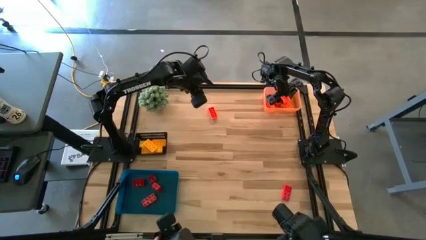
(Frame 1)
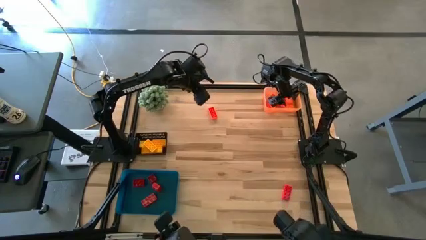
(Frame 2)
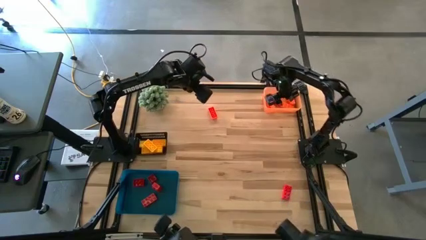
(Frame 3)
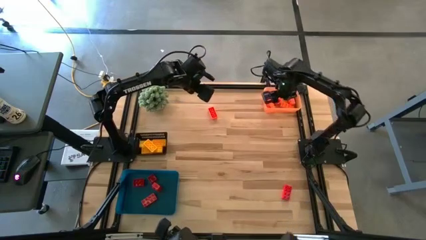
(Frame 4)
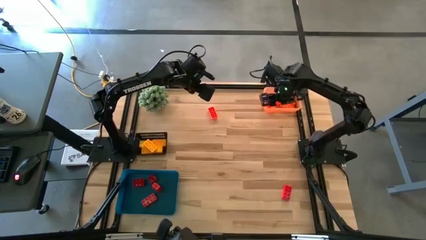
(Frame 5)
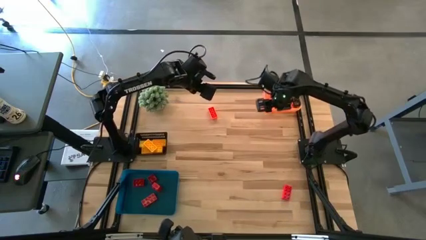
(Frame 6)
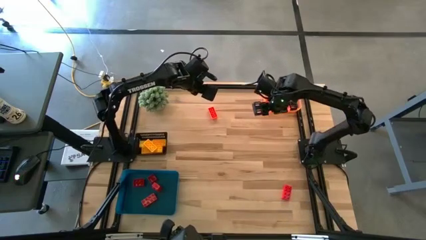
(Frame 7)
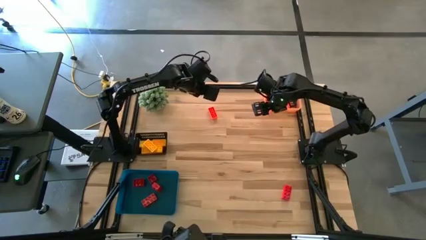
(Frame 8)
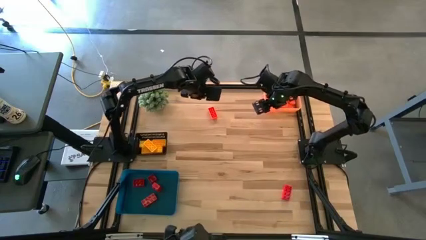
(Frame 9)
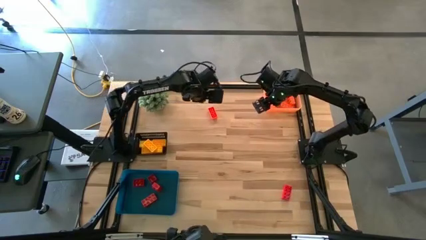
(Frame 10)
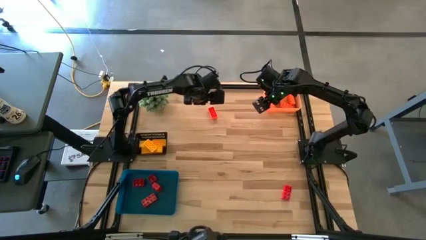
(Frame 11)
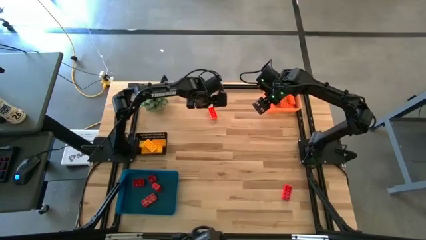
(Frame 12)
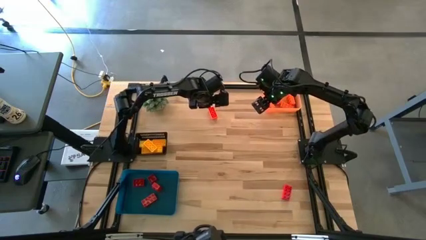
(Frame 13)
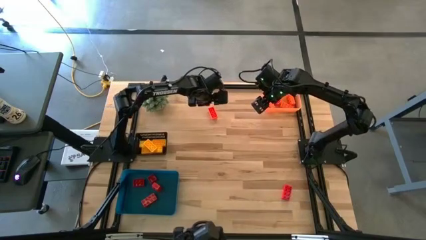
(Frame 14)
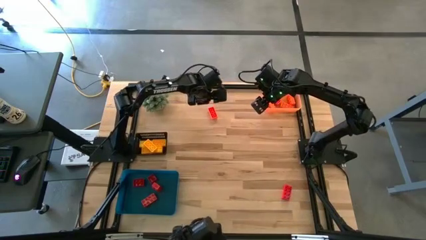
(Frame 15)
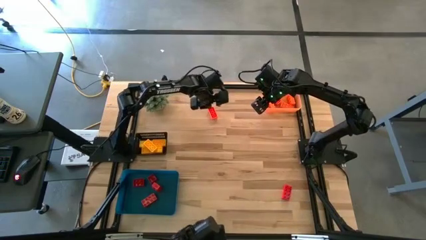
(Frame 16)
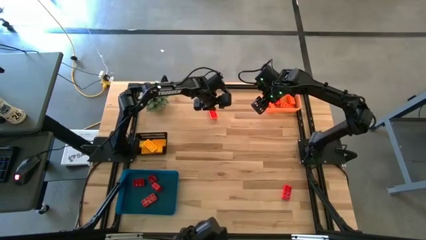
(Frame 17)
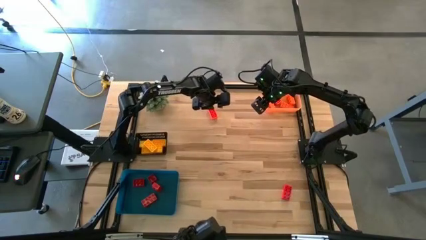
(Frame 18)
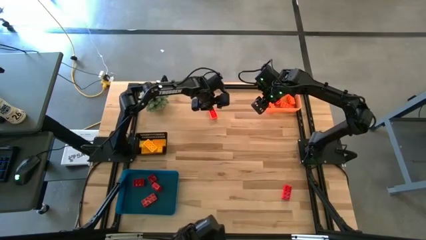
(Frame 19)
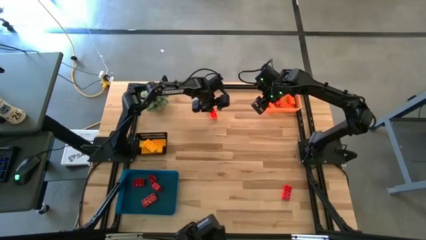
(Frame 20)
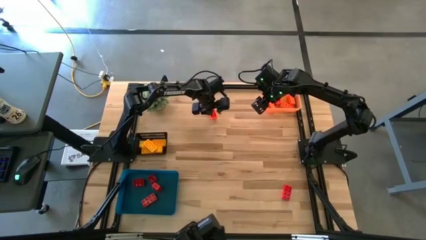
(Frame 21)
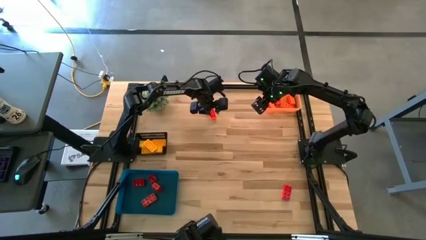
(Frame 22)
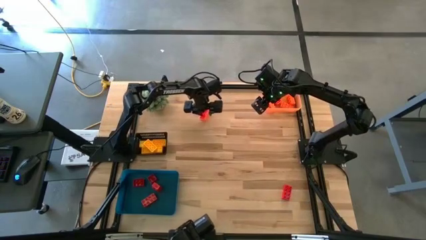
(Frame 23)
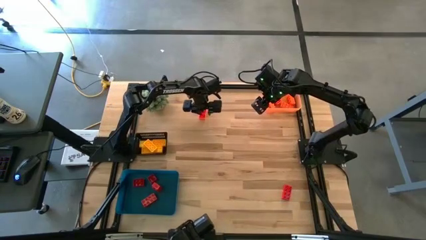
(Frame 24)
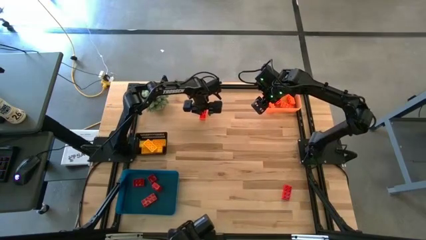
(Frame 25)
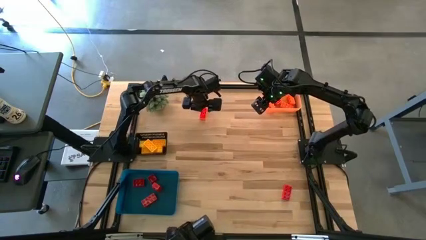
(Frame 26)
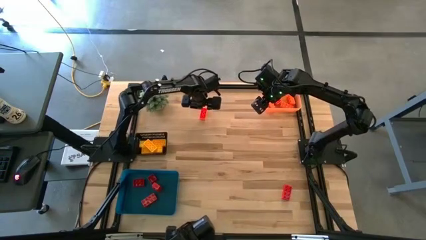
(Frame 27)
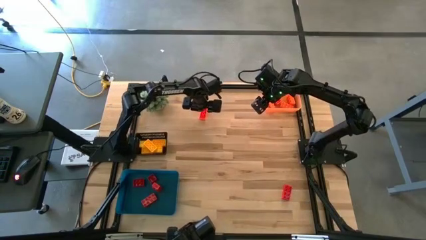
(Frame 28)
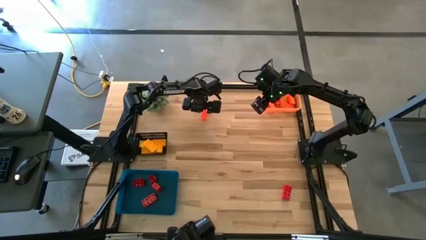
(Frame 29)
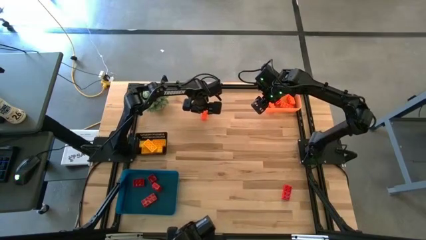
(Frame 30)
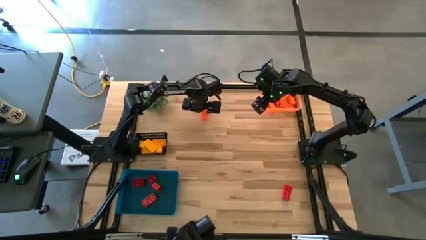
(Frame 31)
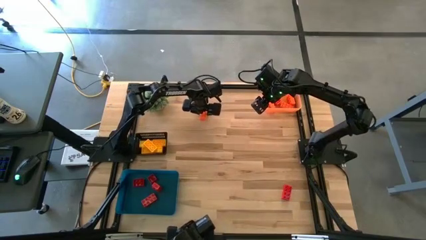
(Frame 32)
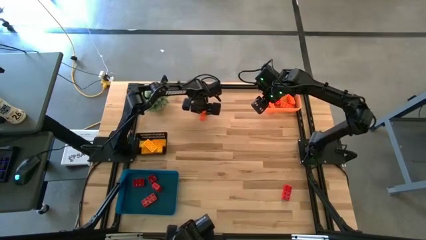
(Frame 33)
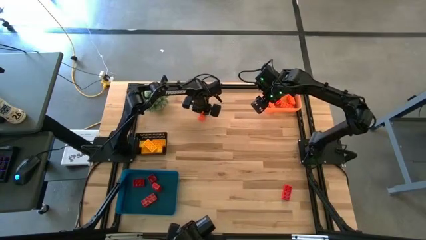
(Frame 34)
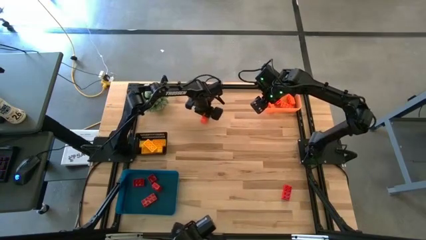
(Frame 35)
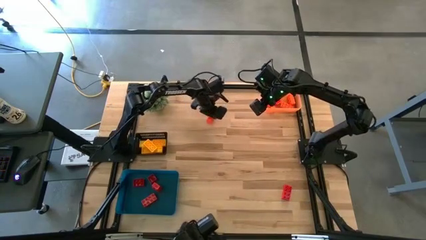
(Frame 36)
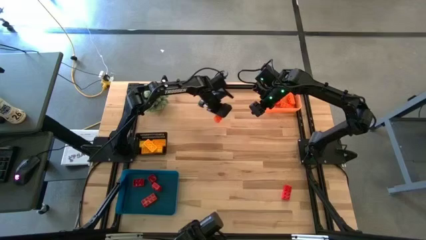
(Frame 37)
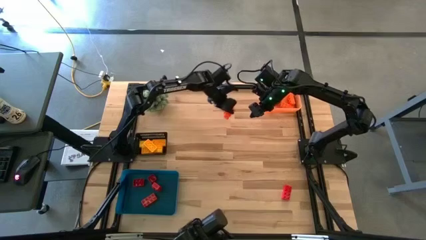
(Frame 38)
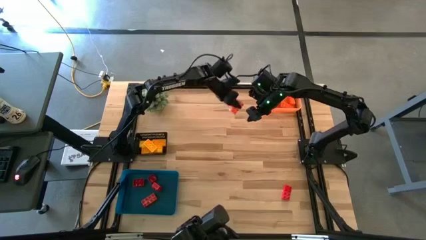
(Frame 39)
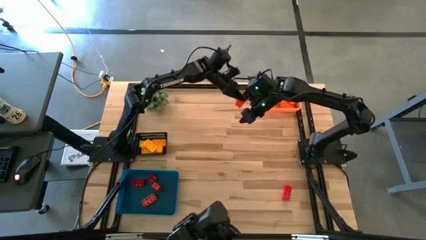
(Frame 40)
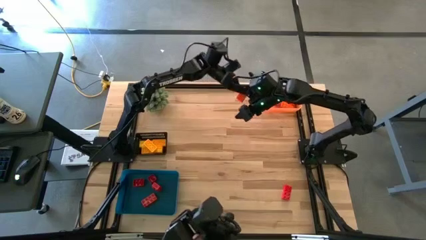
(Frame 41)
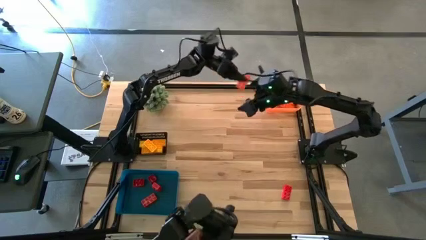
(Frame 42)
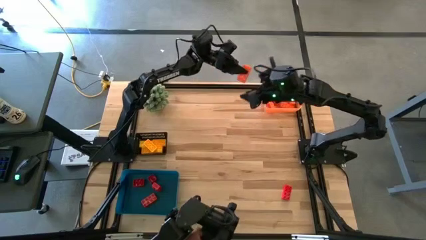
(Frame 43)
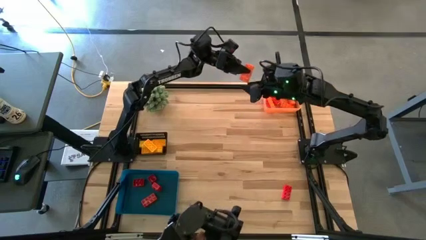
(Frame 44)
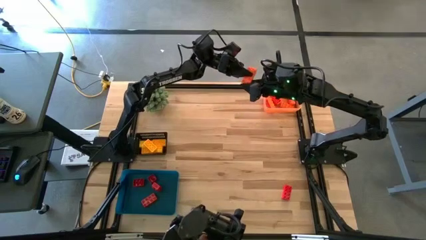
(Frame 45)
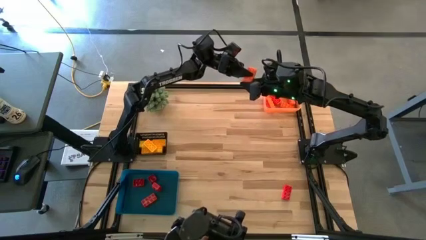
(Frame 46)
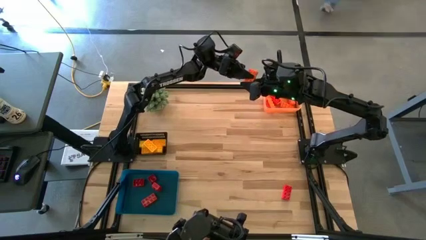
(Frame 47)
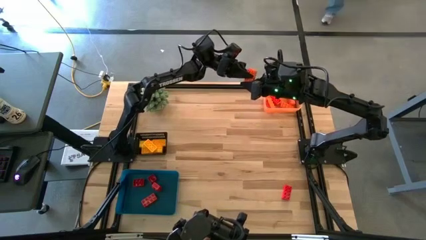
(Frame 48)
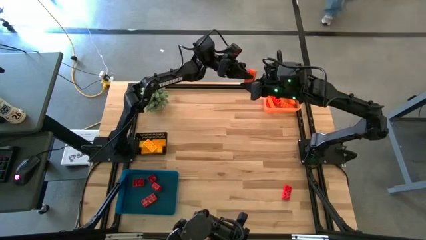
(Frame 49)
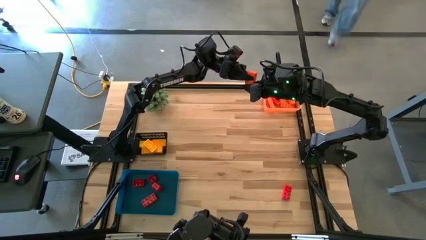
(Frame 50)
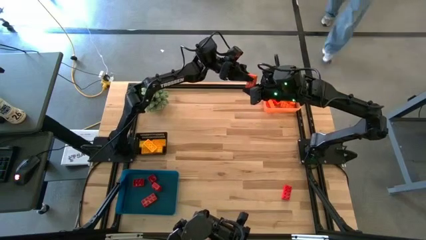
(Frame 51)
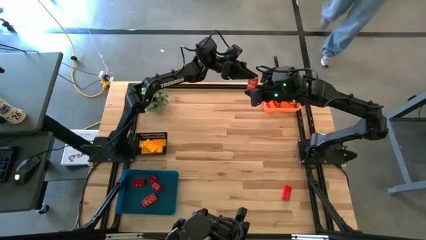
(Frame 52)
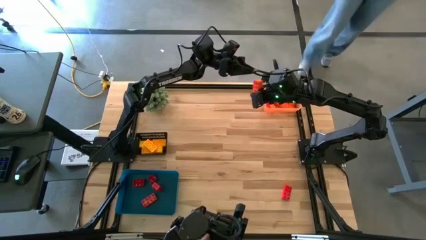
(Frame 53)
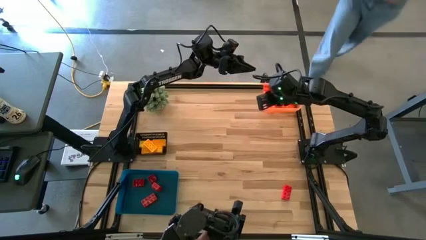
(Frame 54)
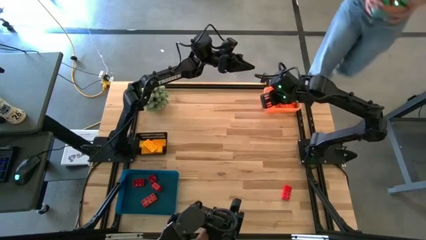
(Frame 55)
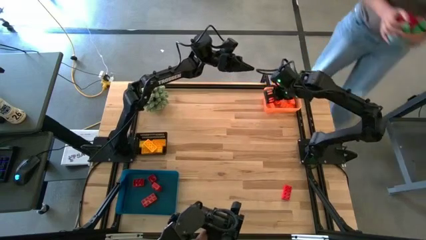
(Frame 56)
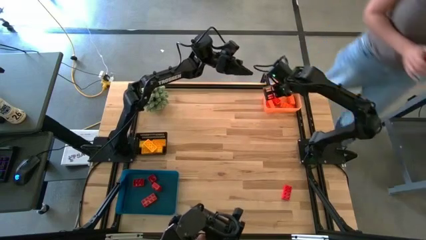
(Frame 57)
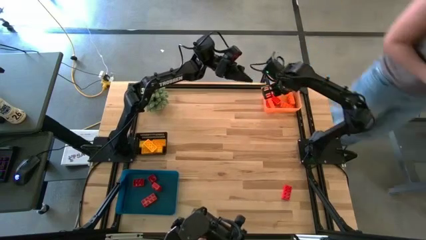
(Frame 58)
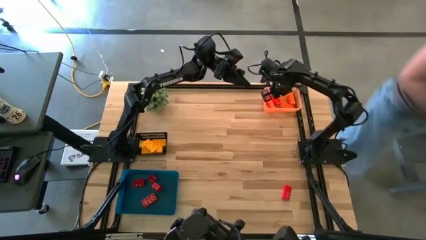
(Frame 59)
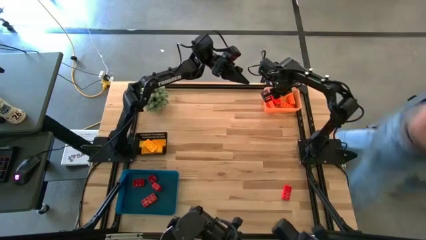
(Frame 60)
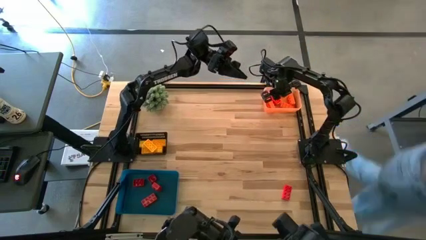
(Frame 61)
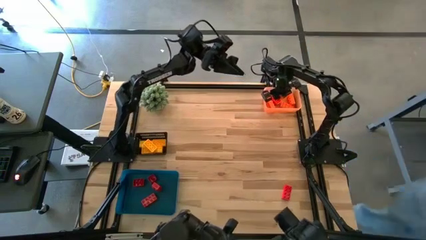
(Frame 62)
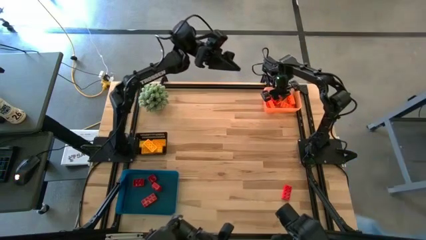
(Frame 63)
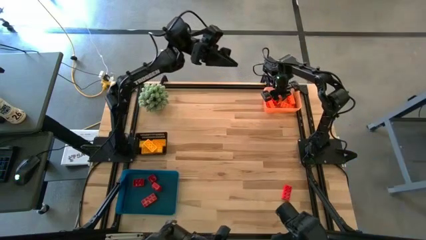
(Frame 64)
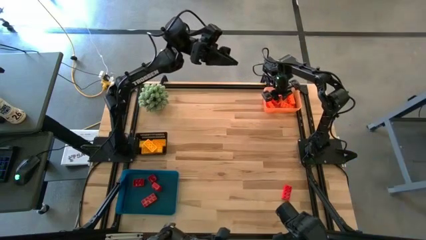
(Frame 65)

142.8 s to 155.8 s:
Task: Sort & place blocks by color
Put the orange game piece into the orange bin

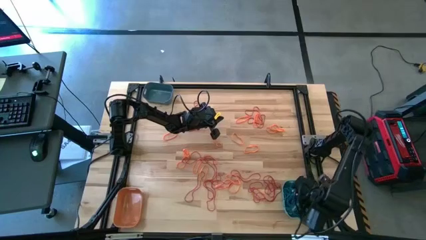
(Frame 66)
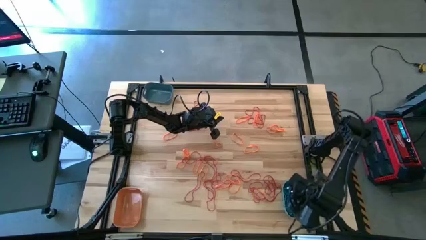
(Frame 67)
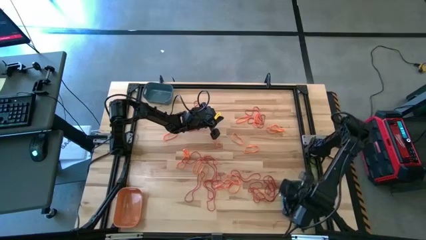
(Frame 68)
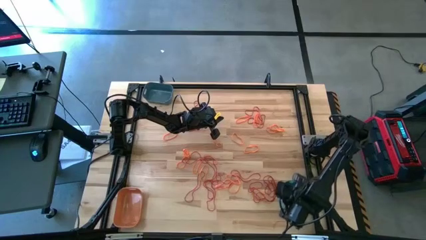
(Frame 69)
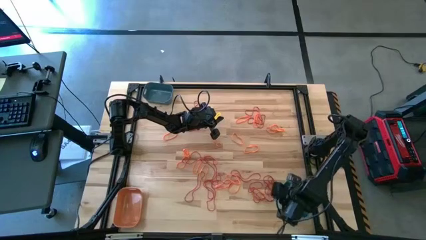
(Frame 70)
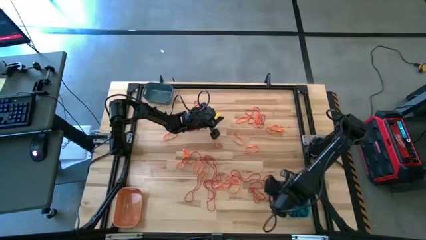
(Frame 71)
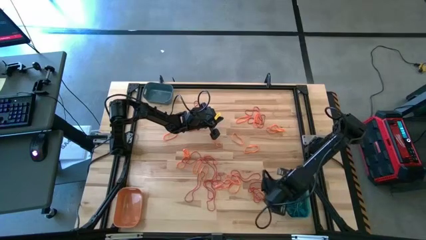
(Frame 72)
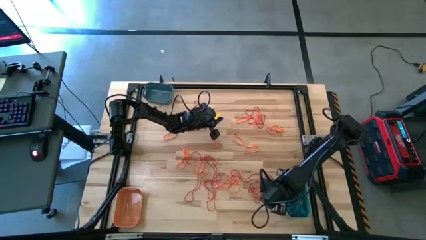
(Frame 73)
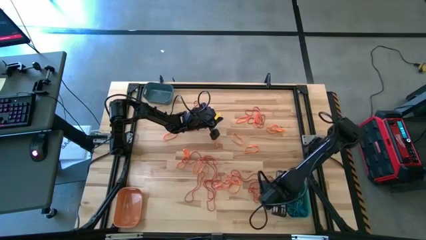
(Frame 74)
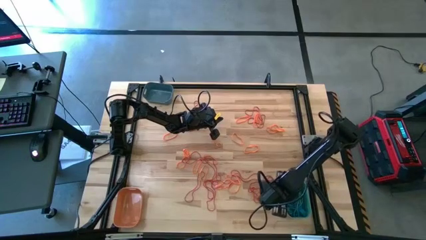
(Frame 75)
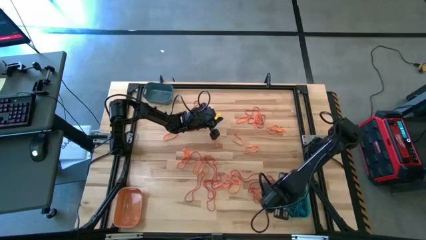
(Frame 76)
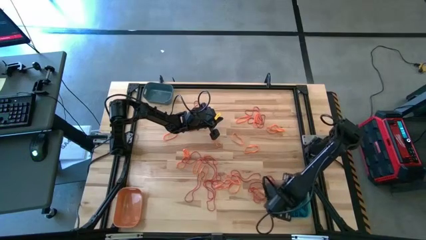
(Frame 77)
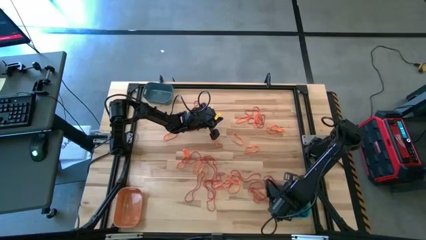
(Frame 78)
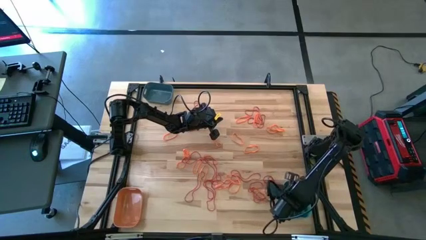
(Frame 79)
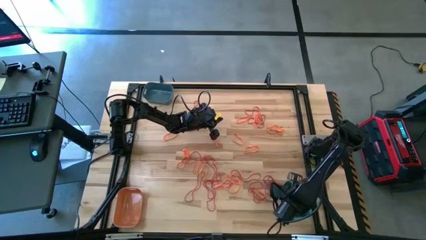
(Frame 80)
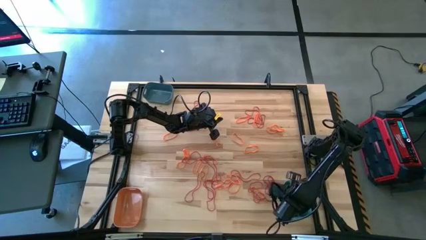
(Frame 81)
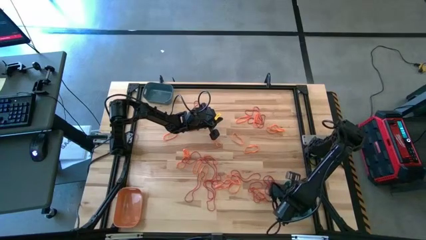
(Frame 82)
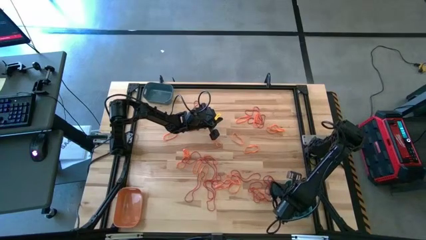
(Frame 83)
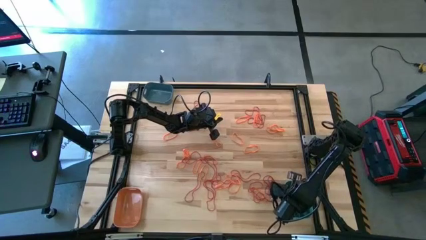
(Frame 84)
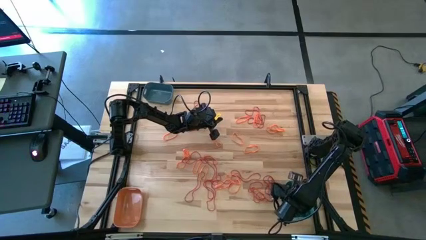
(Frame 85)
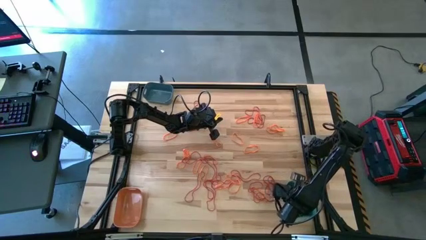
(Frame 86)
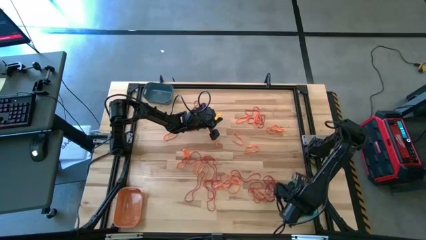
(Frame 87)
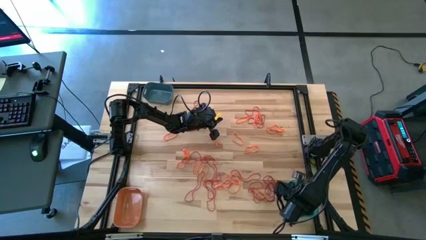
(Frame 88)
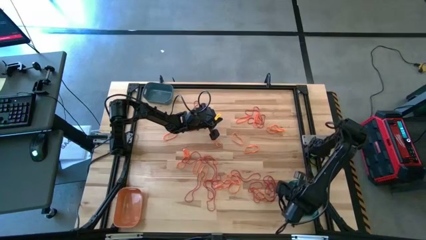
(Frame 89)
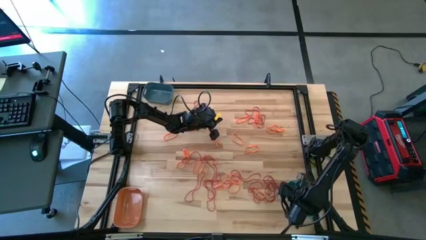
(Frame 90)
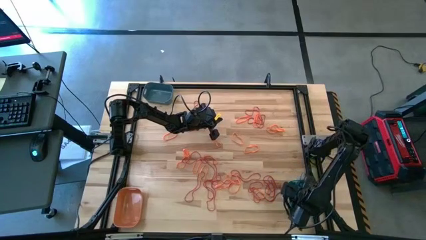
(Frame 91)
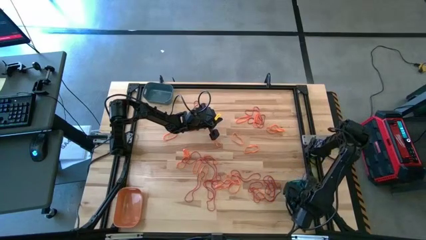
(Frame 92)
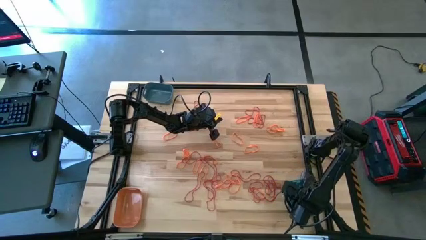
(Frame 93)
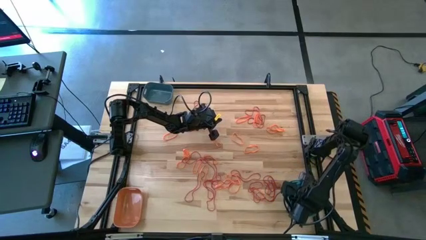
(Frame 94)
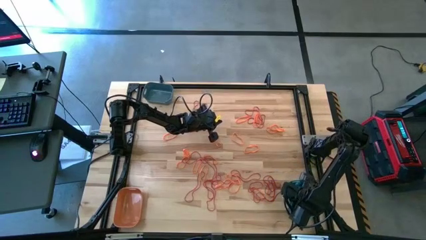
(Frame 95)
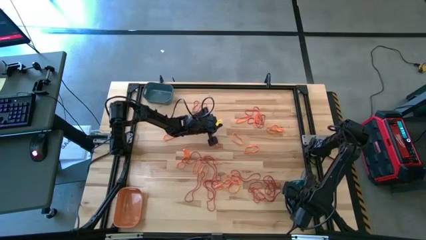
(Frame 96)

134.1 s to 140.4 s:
Task: Sort rubber bands into baskets
Adjust the blue rubber bands
